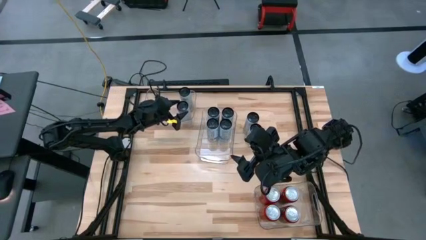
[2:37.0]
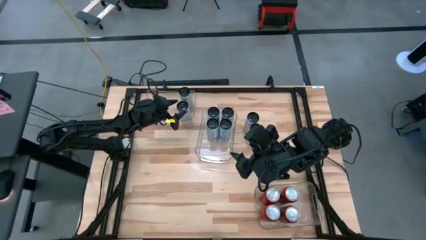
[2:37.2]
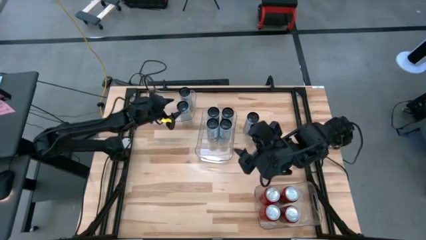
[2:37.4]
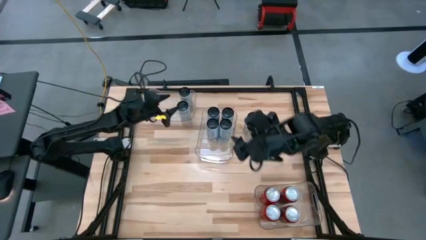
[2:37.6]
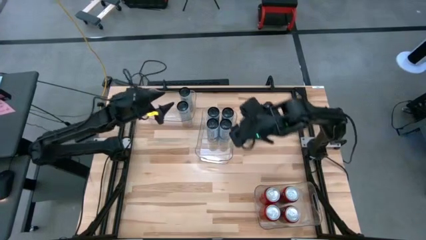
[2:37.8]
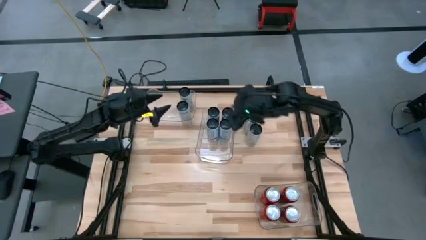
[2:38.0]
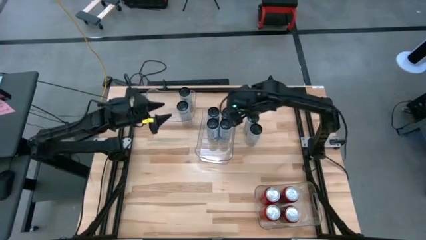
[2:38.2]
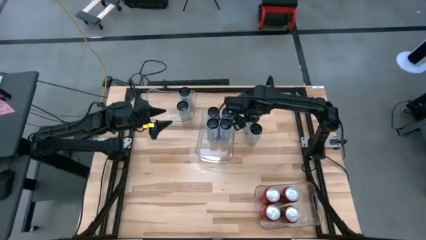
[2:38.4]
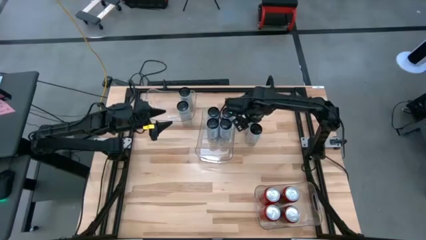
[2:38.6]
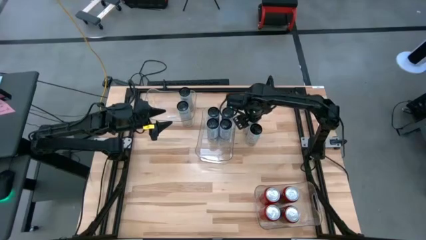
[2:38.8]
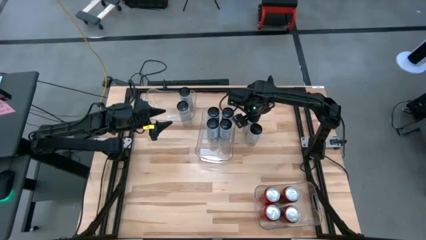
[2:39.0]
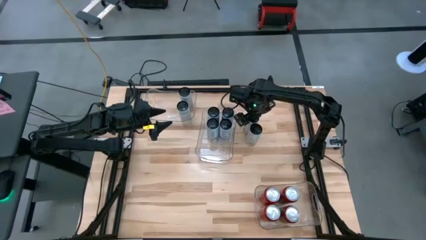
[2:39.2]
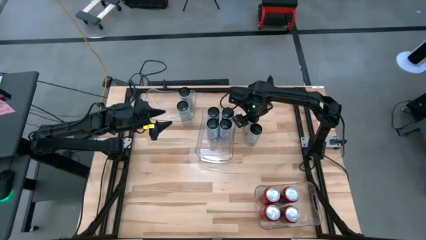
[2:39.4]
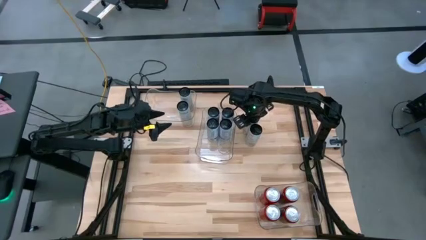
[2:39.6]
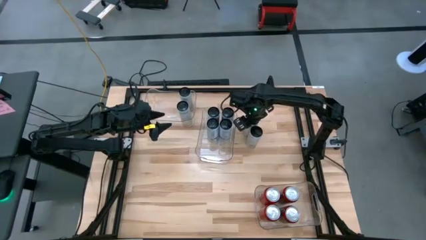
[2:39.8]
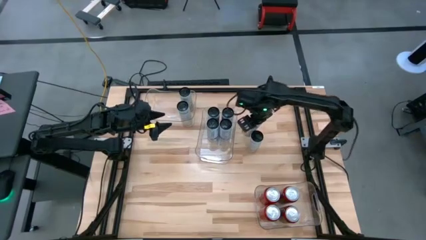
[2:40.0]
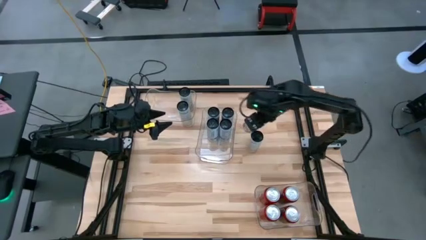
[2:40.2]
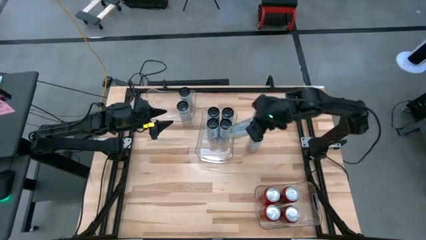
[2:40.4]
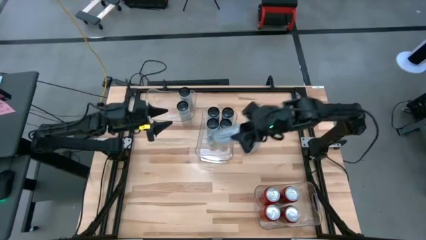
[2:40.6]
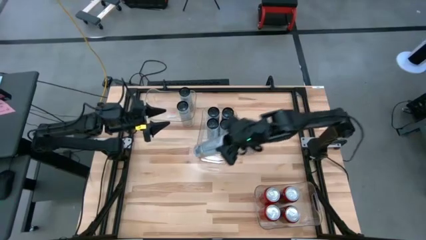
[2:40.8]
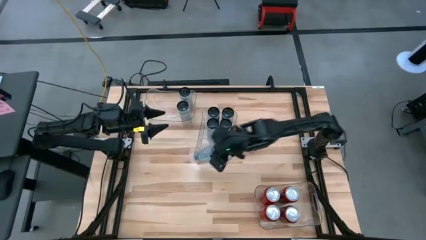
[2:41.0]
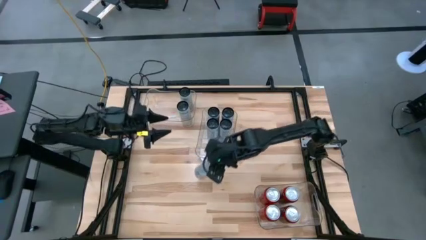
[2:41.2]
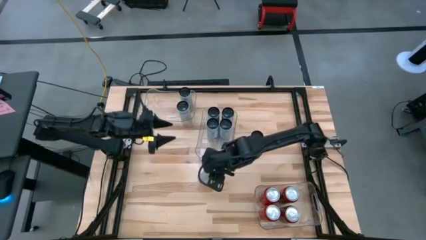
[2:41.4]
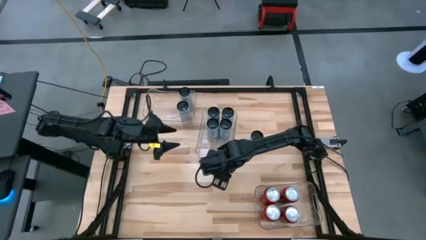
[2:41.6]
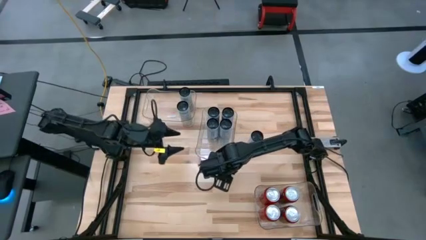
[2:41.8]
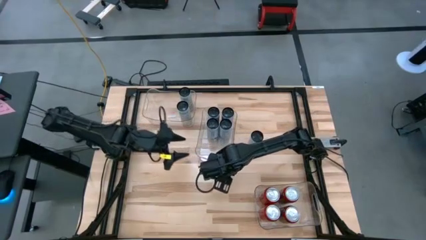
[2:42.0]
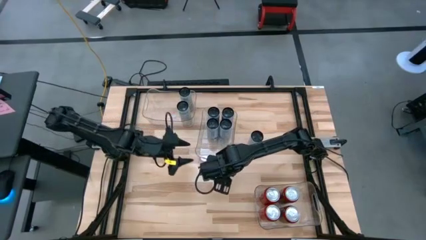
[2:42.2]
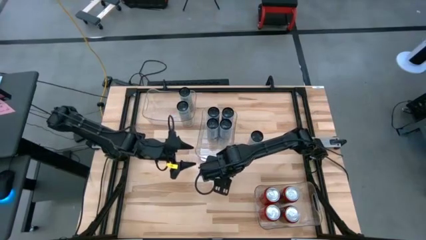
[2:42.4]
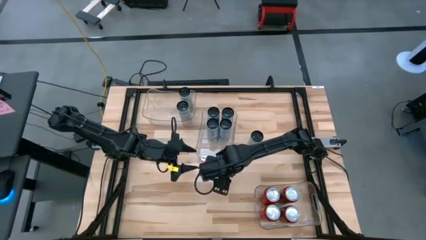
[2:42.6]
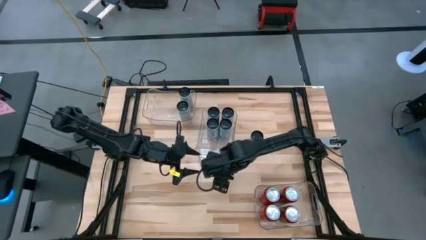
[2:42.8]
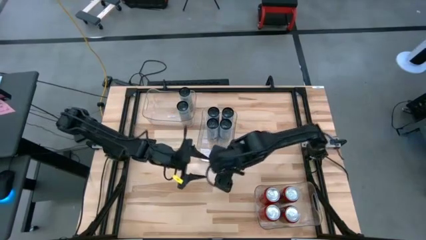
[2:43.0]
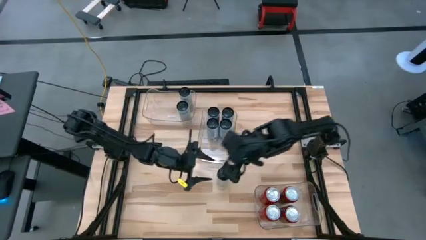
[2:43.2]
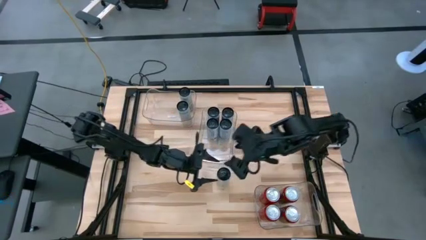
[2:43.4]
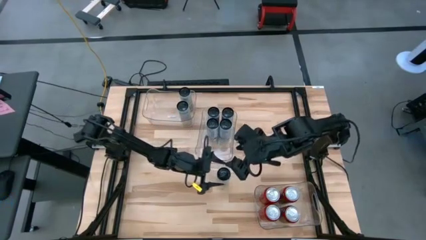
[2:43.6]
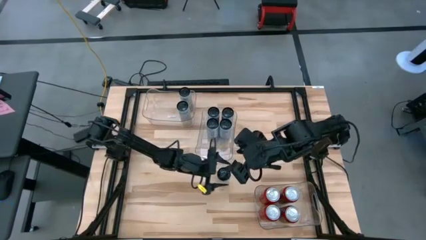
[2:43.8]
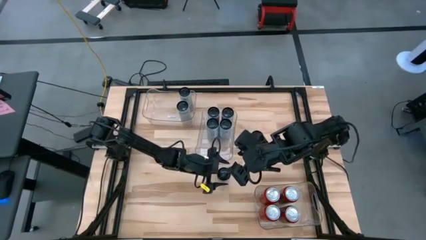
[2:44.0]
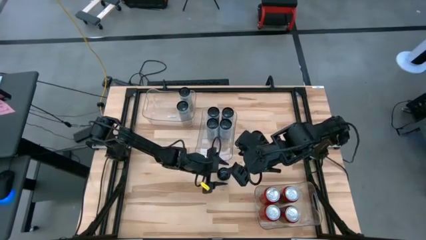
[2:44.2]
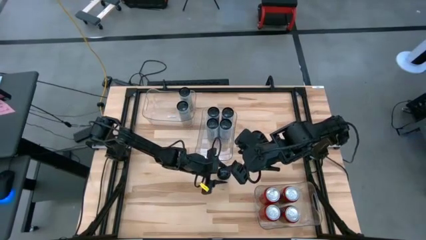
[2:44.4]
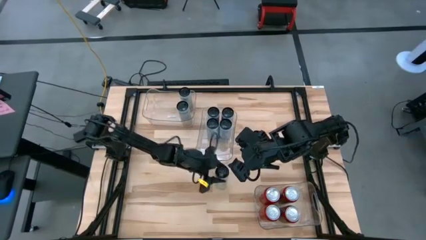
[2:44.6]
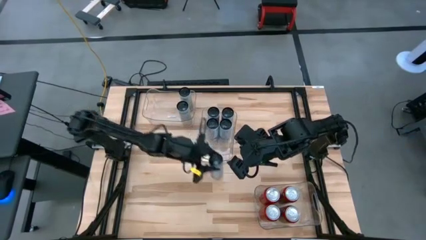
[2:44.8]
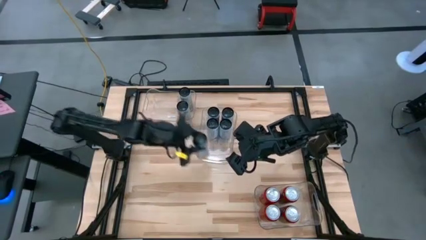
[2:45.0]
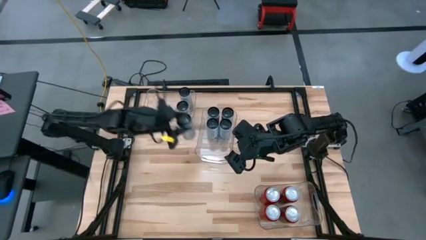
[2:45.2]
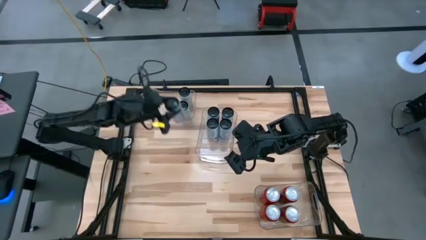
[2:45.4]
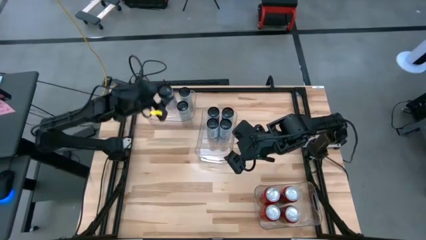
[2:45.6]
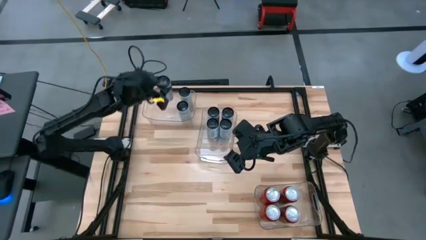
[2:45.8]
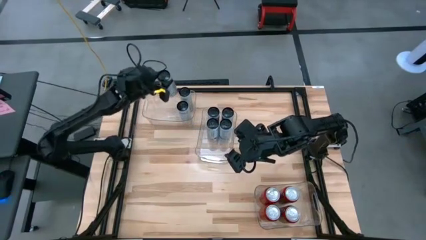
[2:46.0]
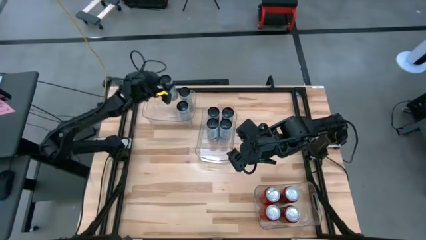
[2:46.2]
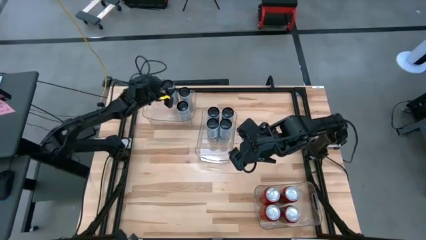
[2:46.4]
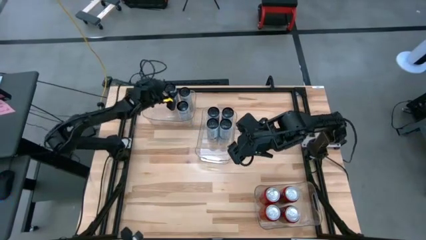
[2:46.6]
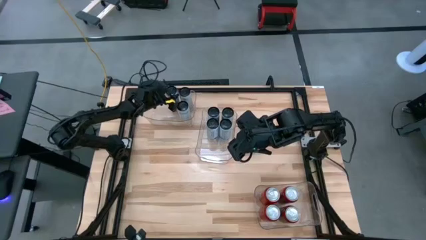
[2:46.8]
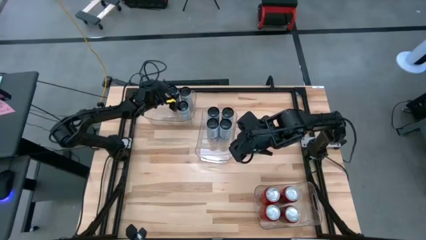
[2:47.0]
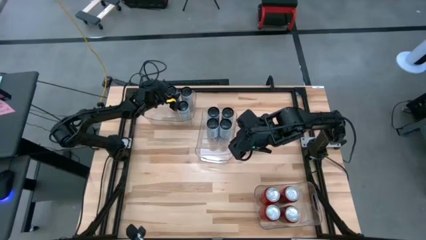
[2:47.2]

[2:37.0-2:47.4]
Task: Sort soda cans
Put the white yellow soda can into the top transparent bin
